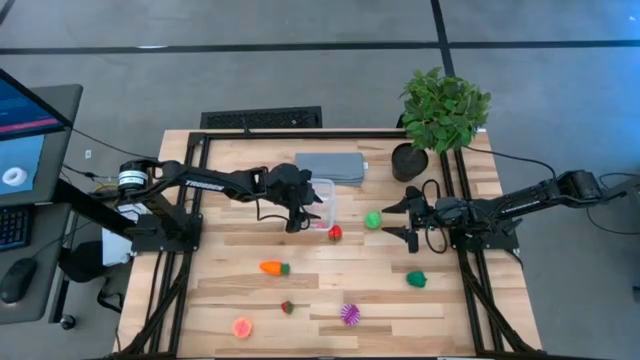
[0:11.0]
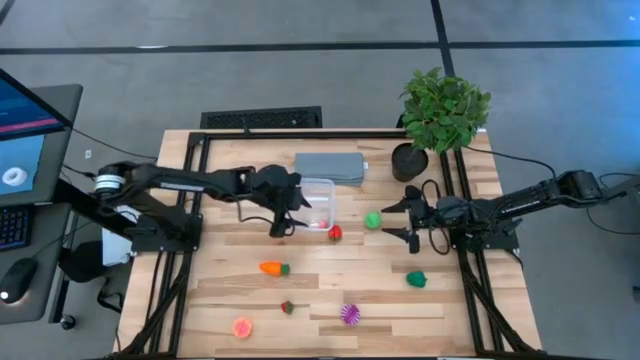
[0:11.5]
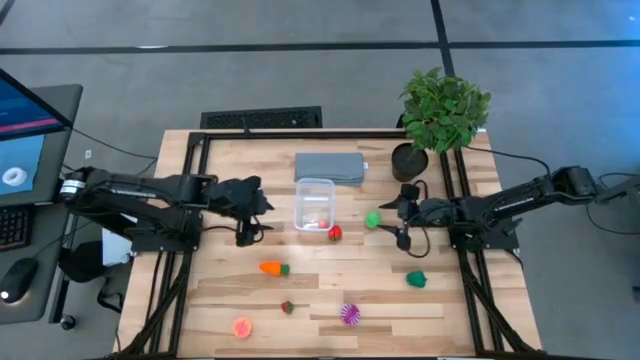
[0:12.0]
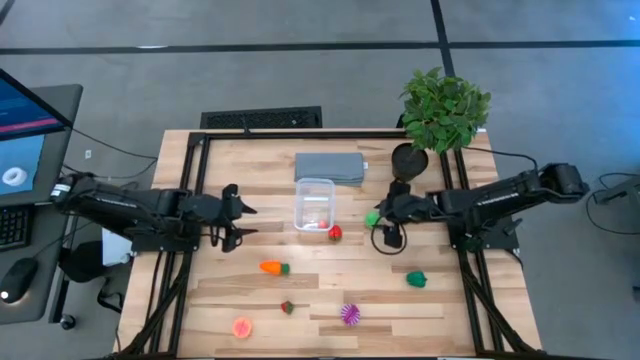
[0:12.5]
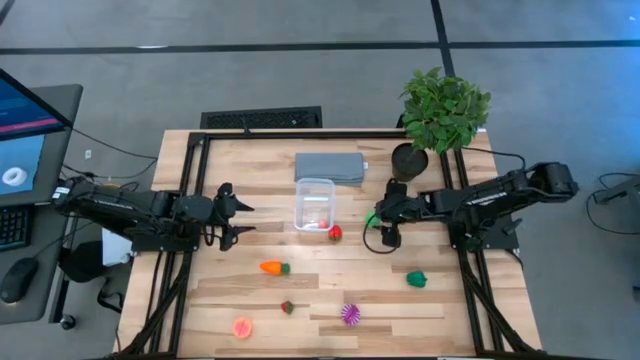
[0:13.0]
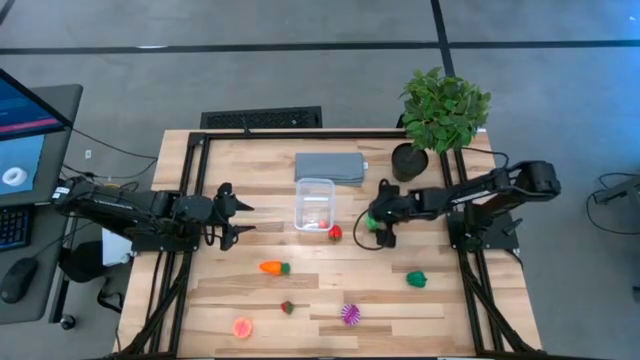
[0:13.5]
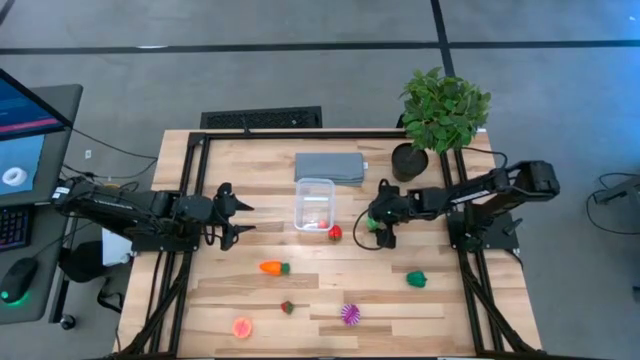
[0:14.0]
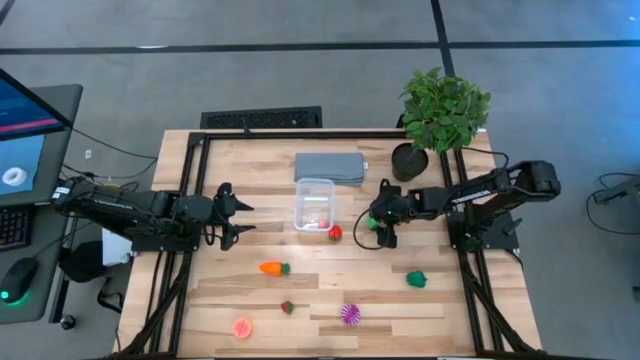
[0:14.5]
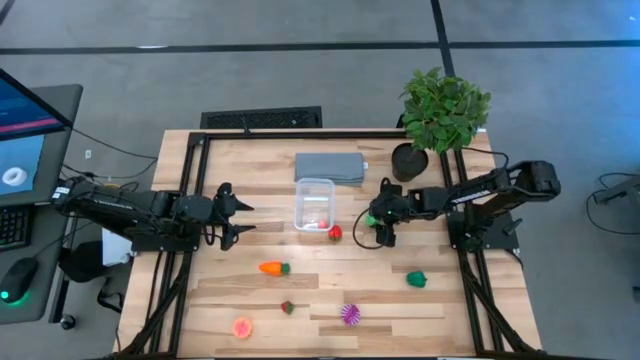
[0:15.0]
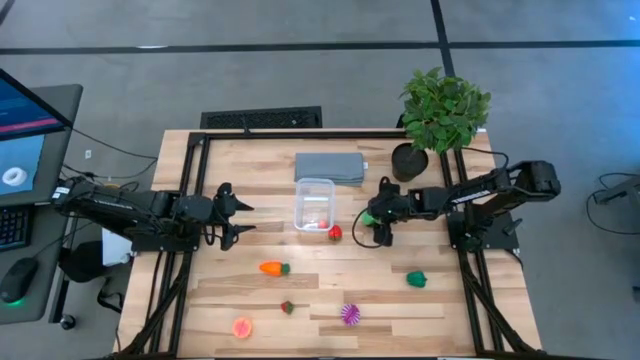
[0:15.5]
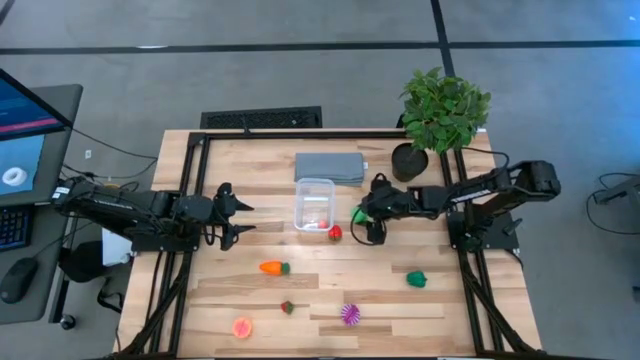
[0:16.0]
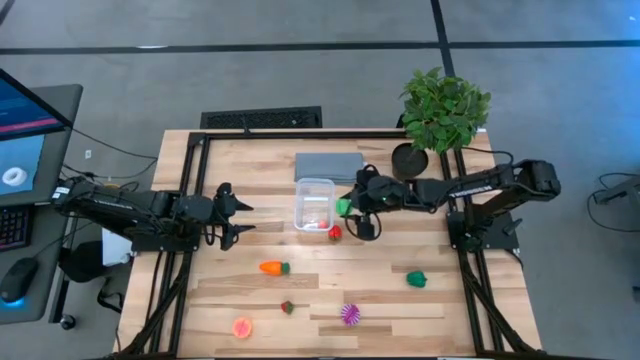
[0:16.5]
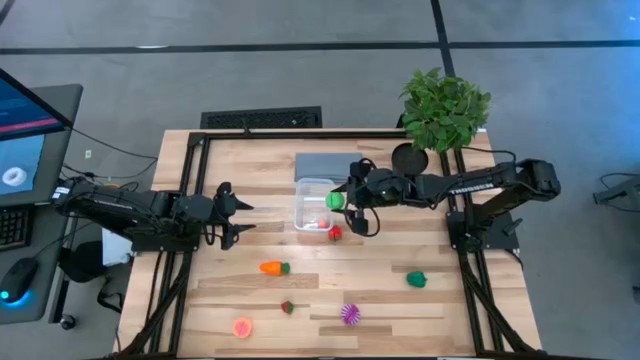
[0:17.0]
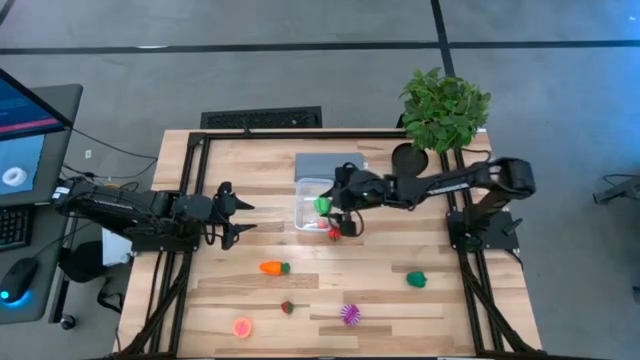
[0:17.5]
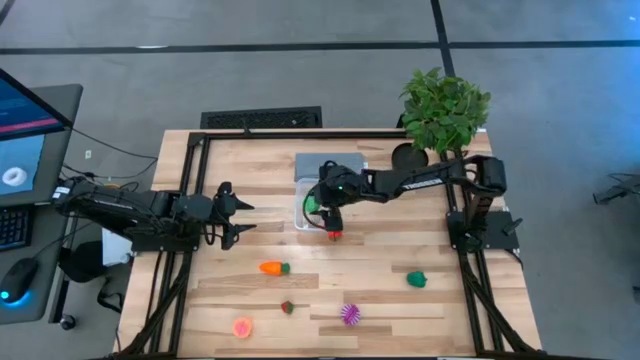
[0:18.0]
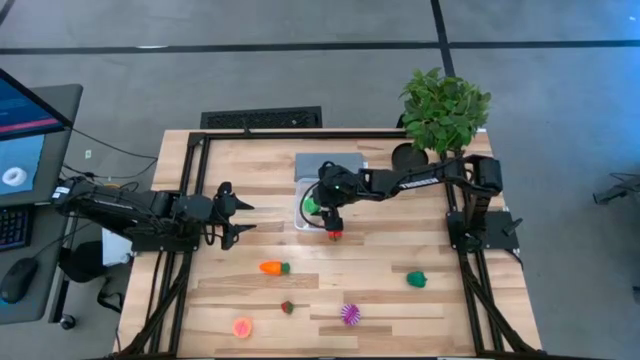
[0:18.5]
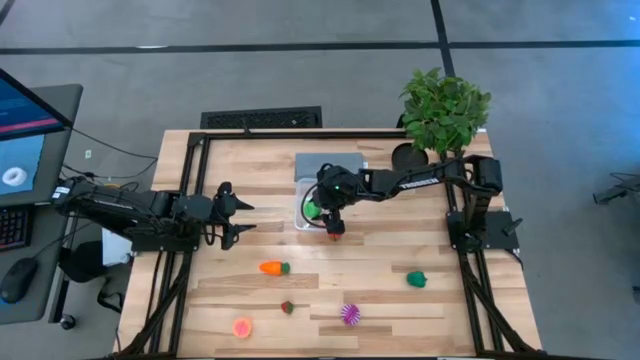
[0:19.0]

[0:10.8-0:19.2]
Task: Pick and placing Produce into tupperware
Put the green pear into the transparent bin

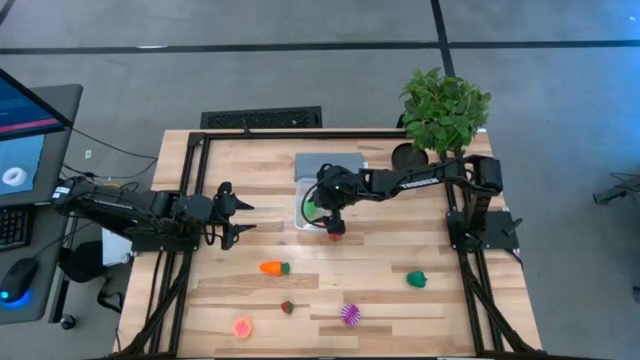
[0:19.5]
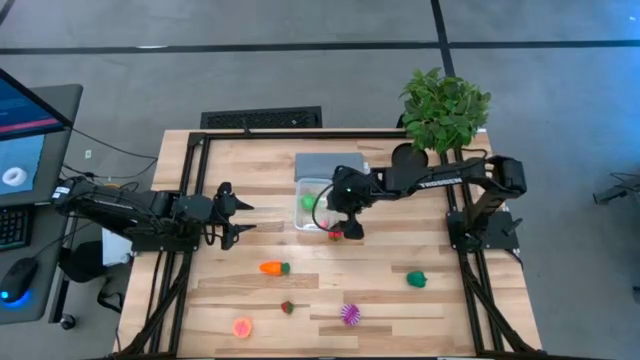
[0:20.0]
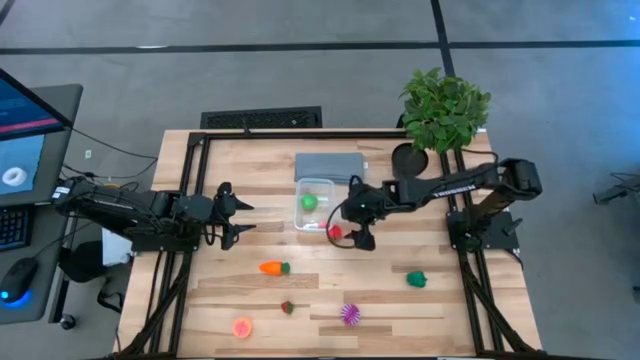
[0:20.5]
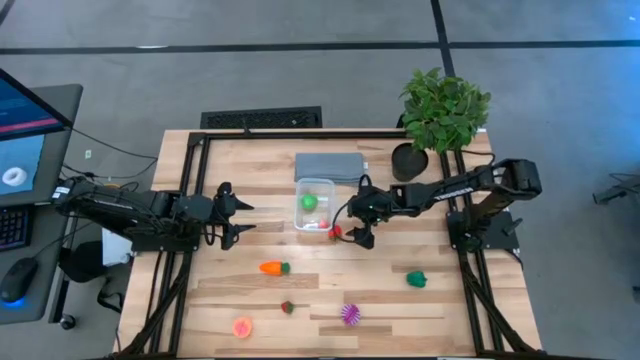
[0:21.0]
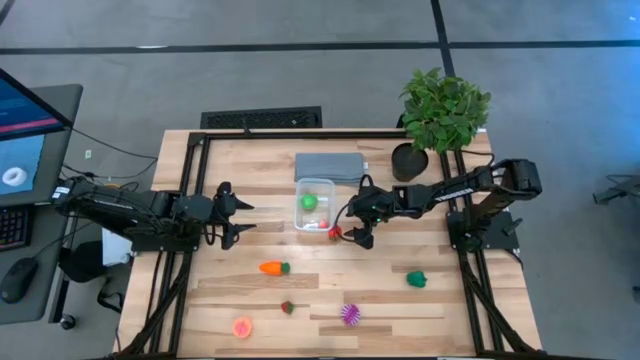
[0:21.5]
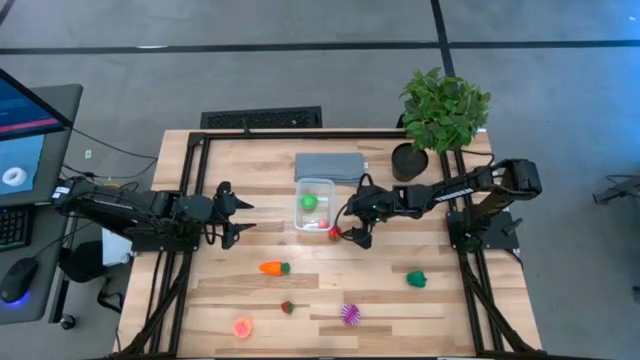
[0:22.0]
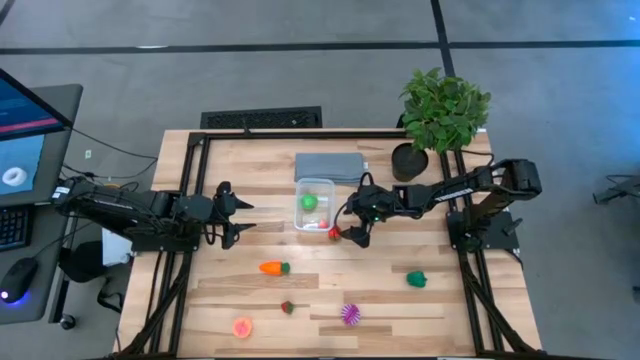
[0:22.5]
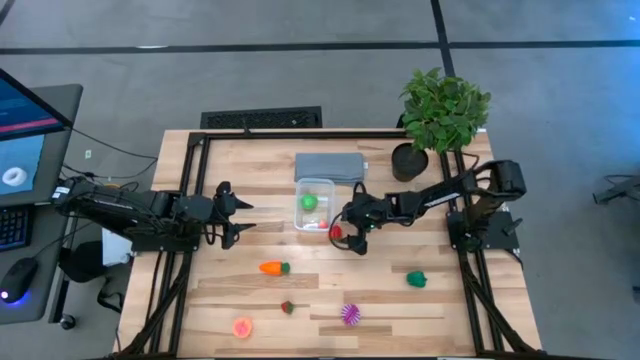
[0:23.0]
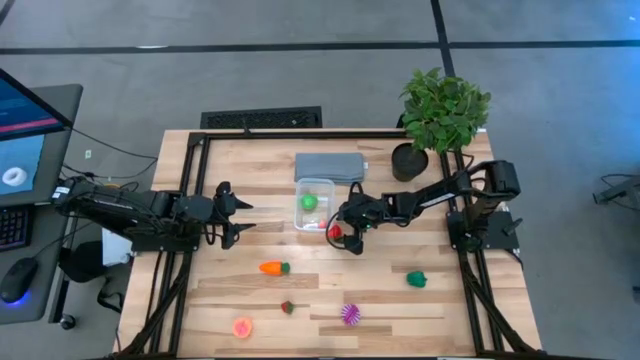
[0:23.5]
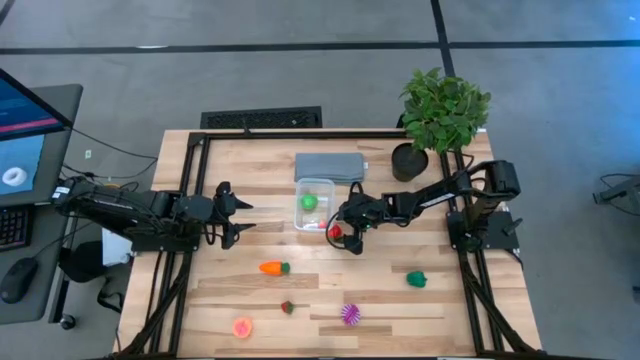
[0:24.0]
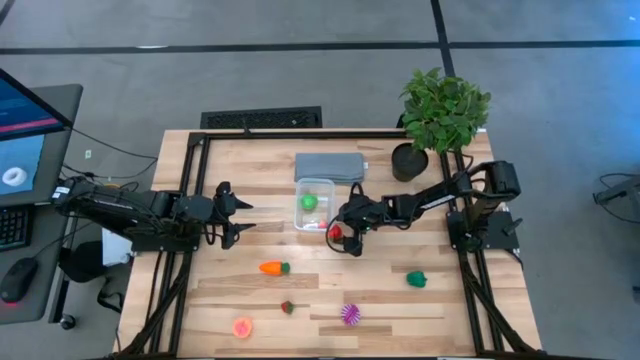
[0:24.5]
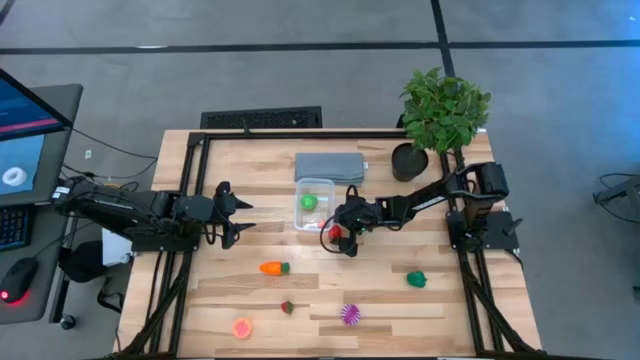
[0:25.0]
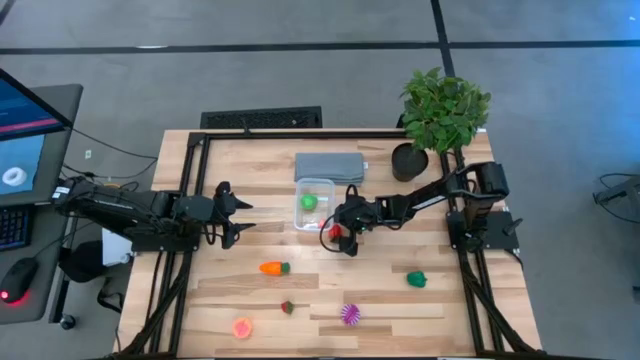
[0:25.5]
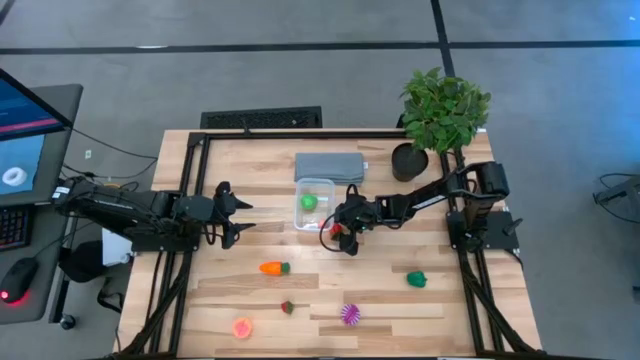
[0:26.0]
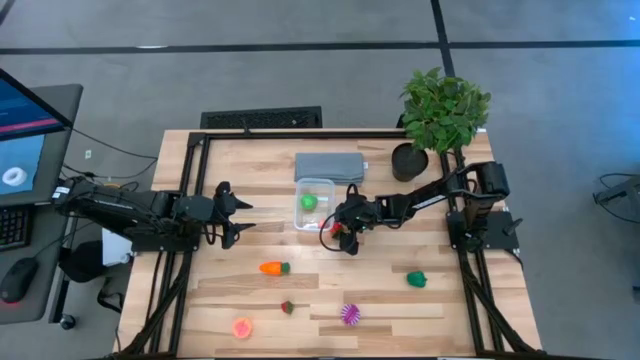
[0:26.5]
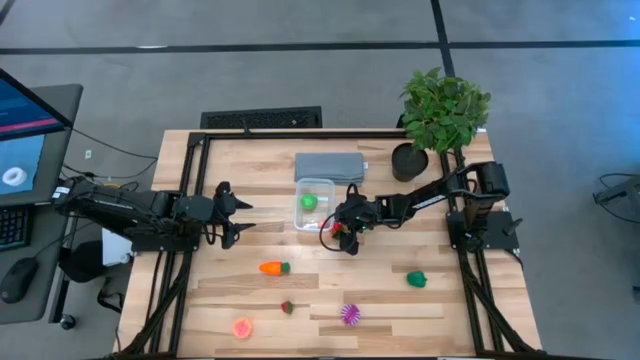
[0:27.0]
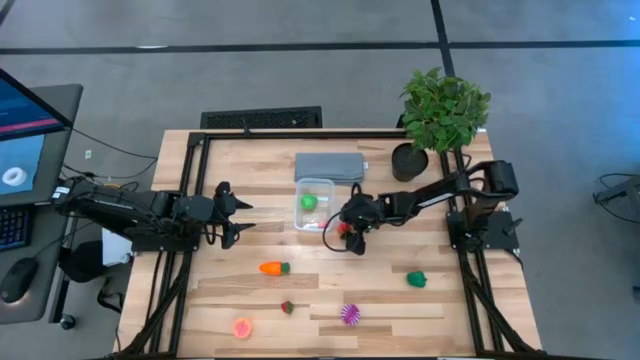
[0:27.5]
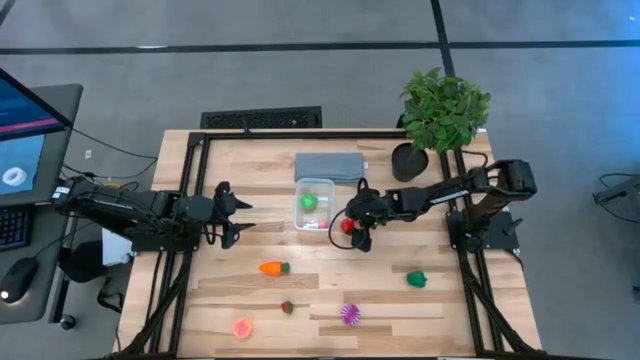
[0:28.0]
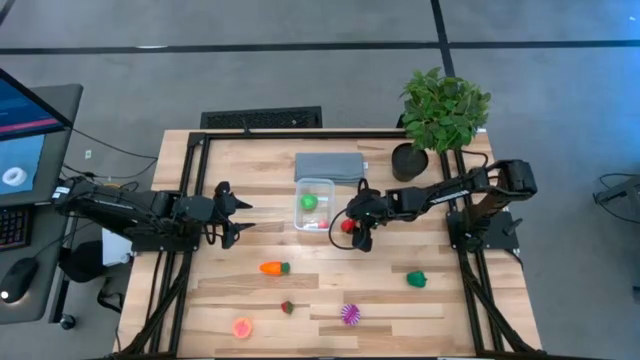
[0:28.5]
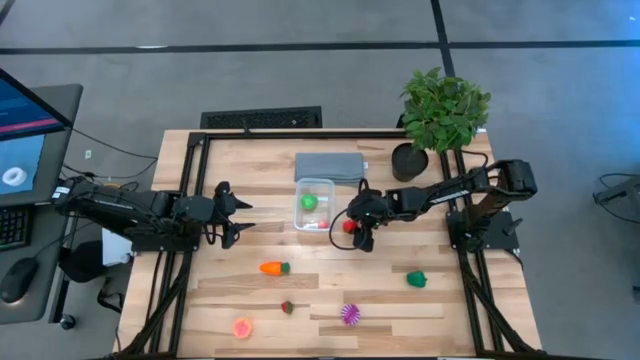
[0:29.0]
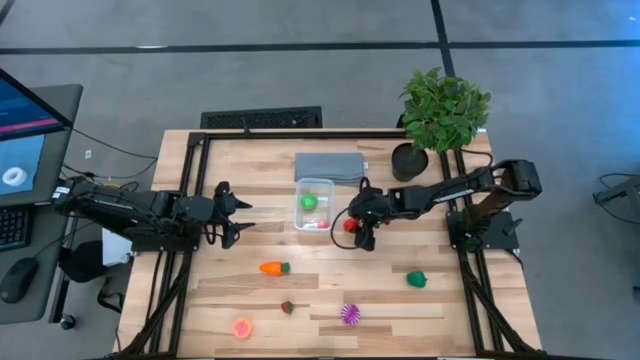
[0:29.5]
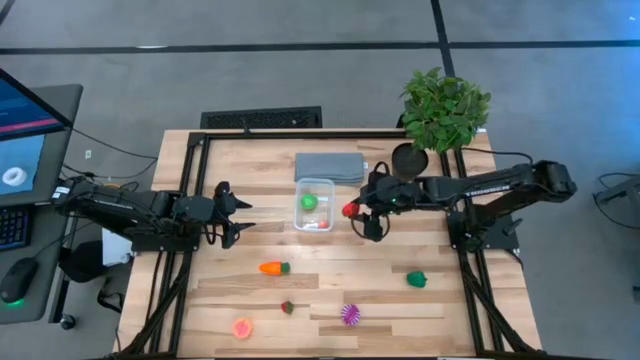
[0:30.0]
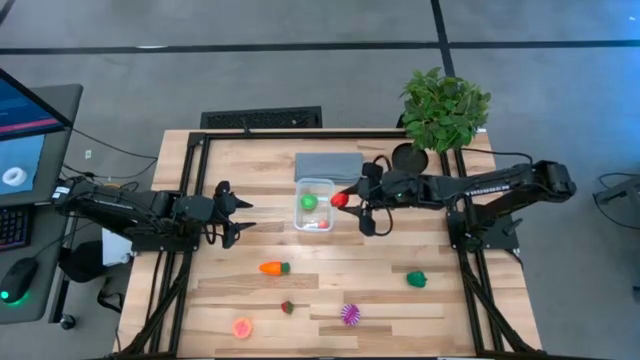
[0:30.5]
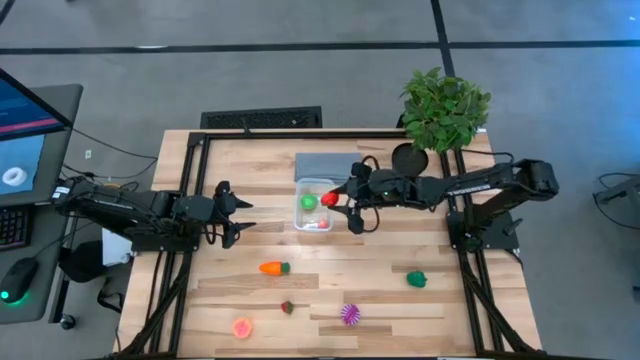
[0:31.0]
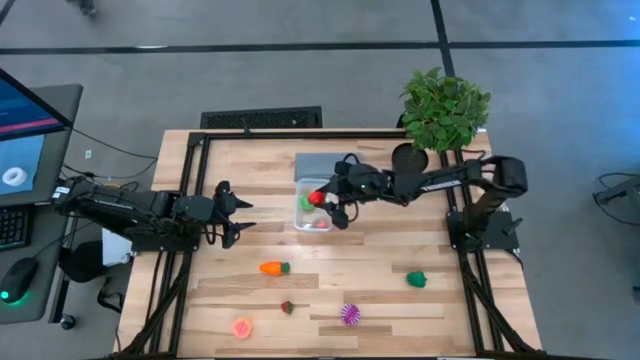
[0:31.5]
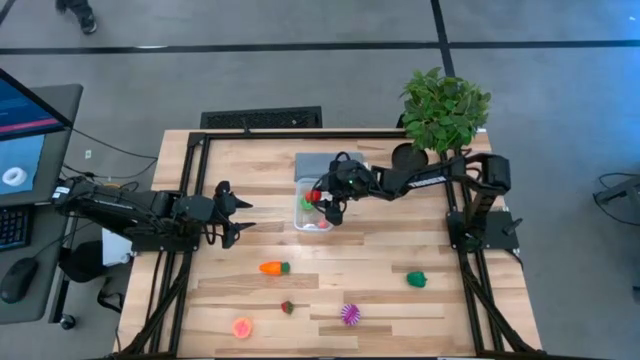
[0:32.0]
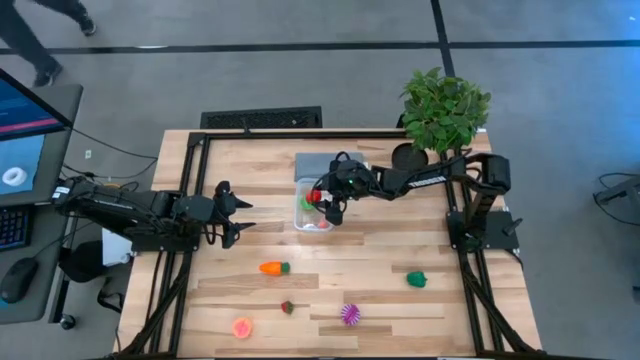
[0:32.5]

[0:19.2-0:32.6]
Put the top red strawberry into the transparent bin
